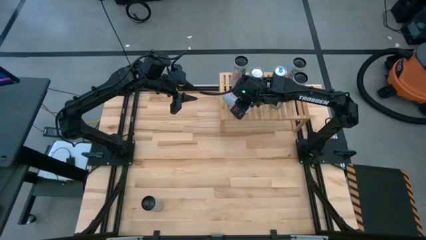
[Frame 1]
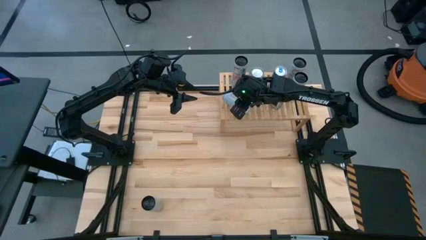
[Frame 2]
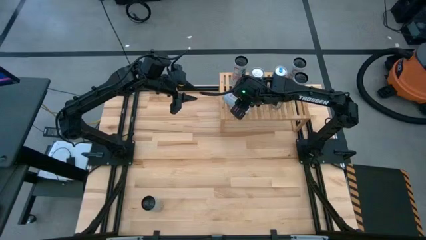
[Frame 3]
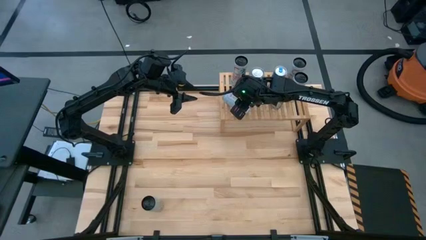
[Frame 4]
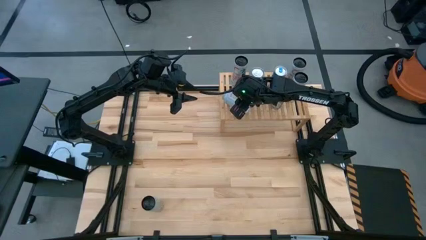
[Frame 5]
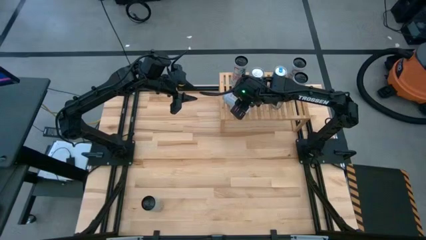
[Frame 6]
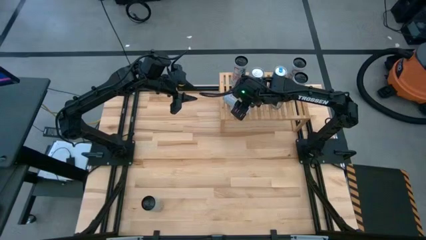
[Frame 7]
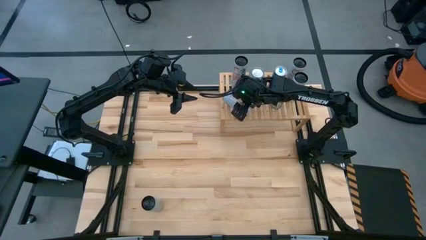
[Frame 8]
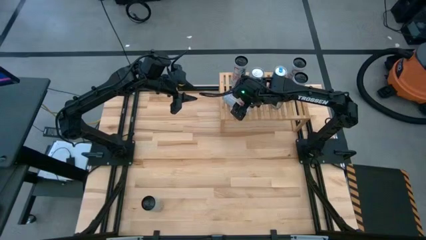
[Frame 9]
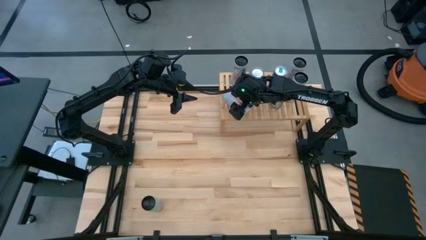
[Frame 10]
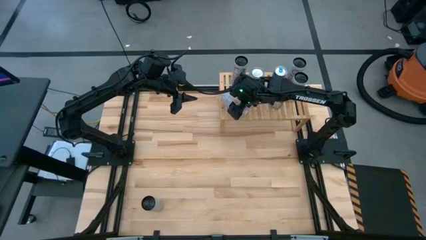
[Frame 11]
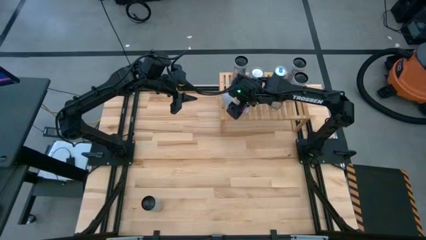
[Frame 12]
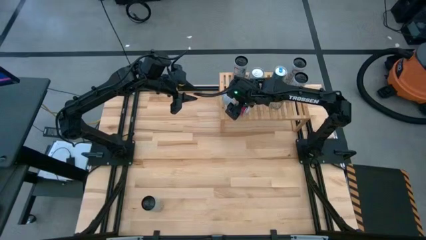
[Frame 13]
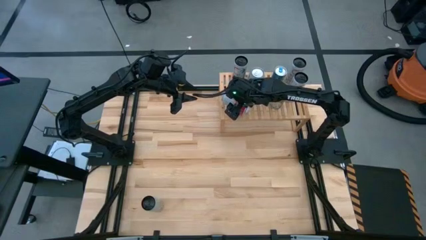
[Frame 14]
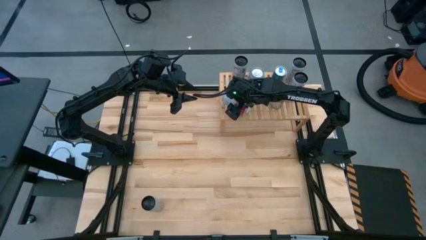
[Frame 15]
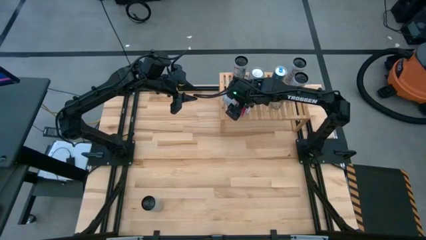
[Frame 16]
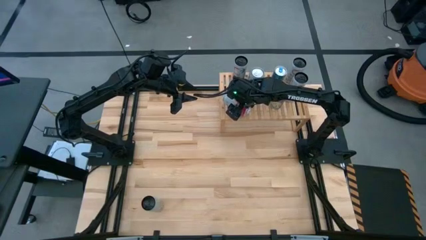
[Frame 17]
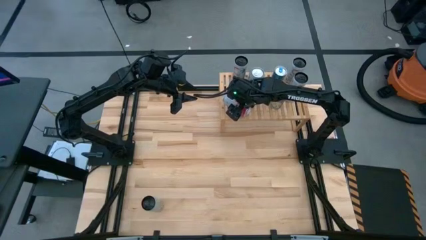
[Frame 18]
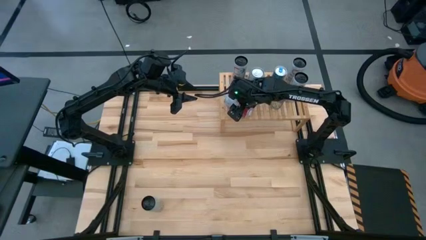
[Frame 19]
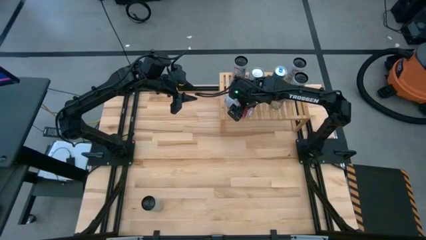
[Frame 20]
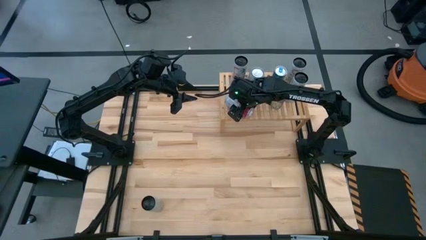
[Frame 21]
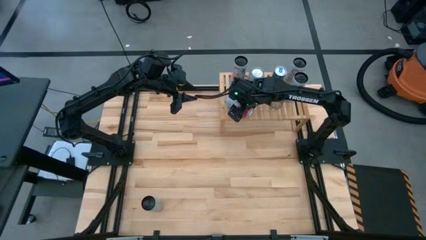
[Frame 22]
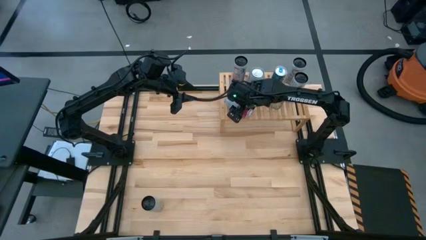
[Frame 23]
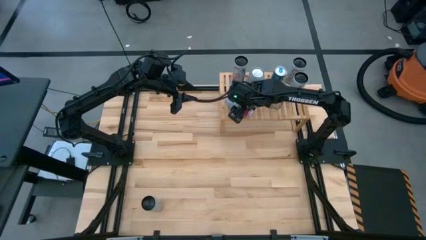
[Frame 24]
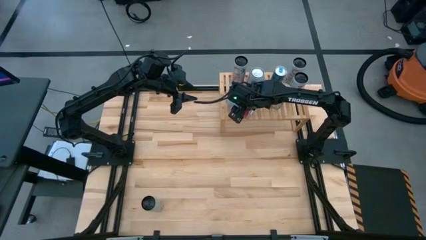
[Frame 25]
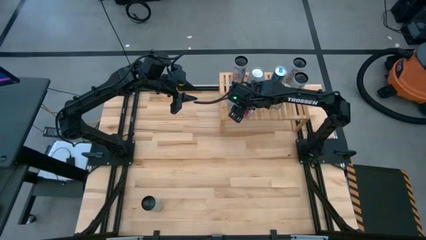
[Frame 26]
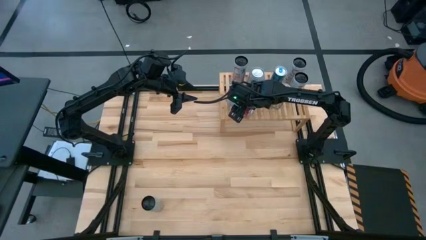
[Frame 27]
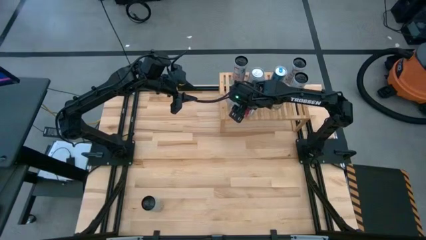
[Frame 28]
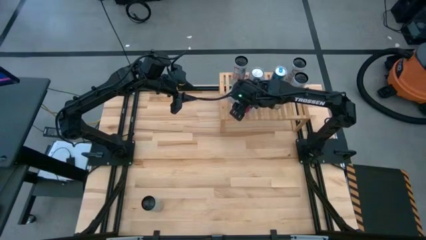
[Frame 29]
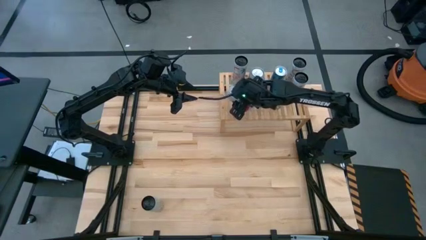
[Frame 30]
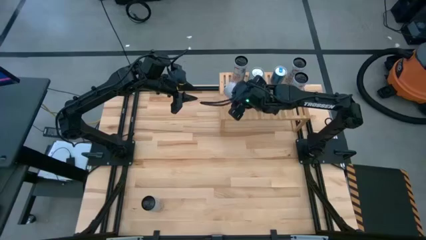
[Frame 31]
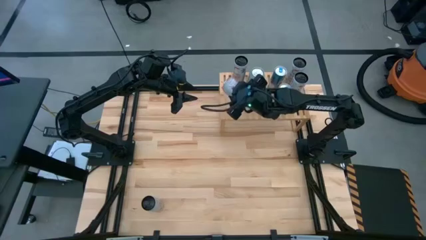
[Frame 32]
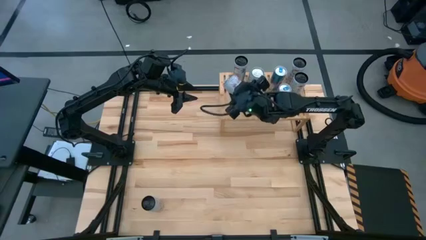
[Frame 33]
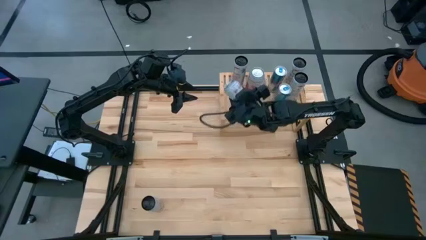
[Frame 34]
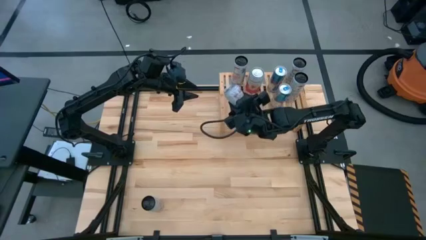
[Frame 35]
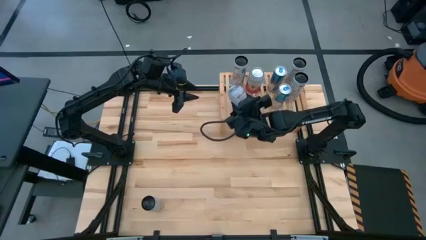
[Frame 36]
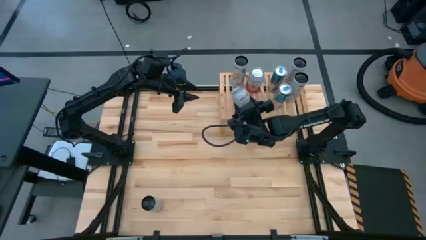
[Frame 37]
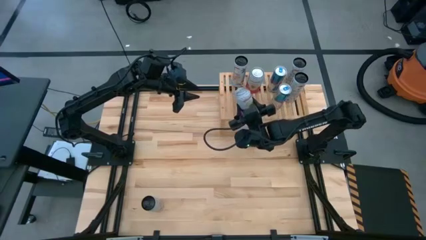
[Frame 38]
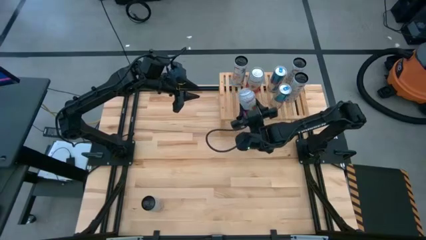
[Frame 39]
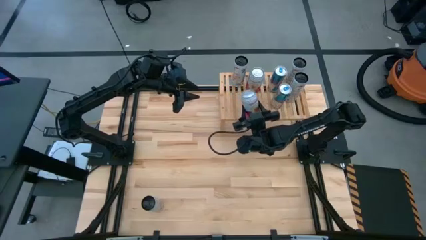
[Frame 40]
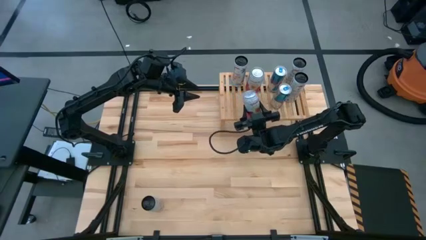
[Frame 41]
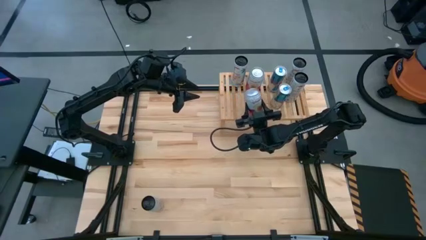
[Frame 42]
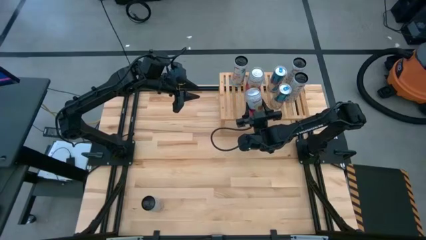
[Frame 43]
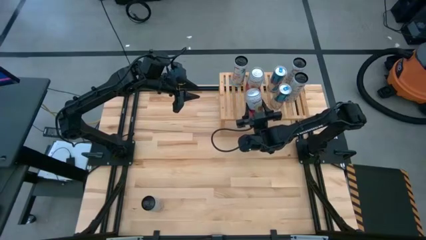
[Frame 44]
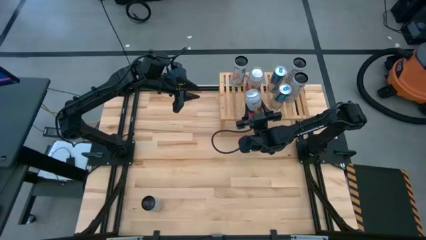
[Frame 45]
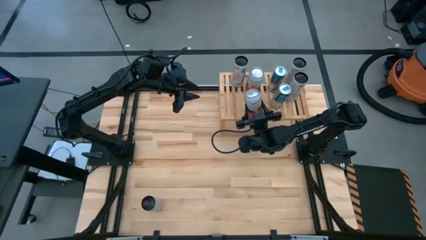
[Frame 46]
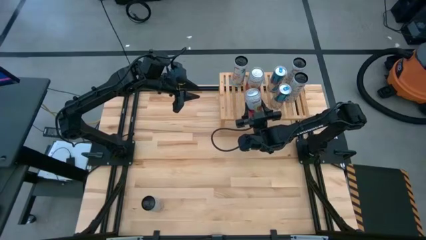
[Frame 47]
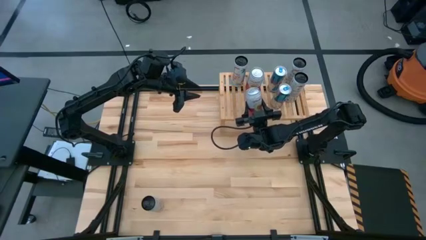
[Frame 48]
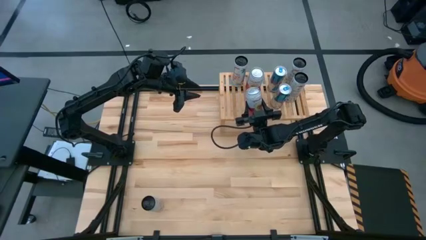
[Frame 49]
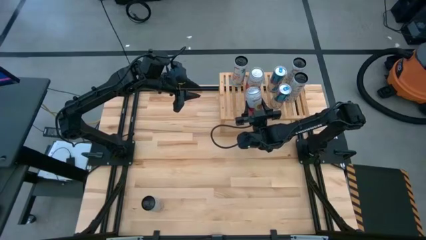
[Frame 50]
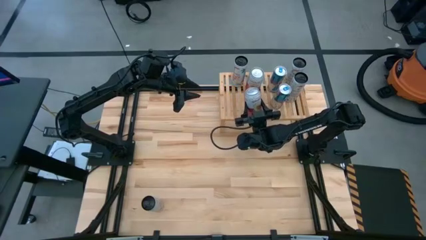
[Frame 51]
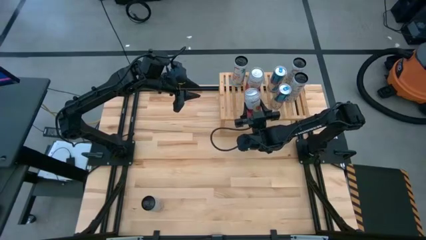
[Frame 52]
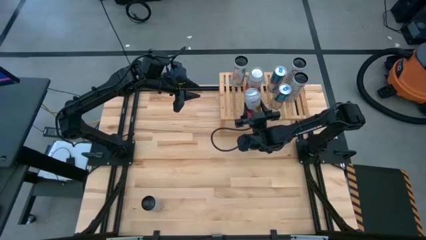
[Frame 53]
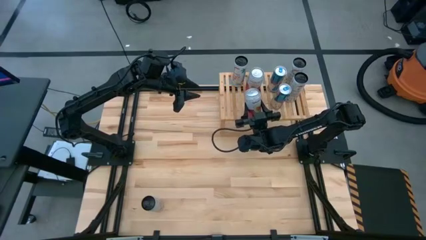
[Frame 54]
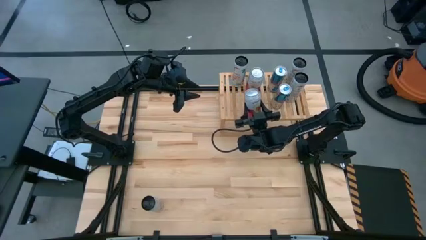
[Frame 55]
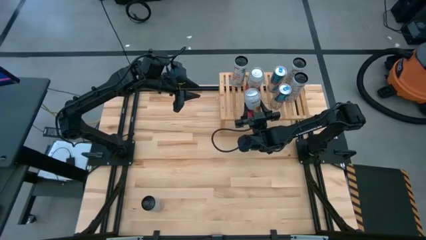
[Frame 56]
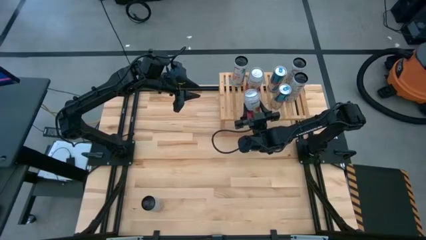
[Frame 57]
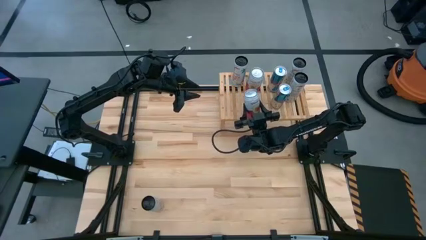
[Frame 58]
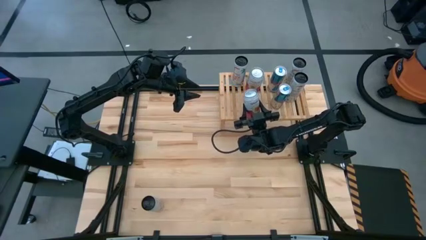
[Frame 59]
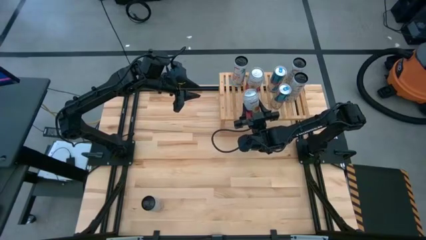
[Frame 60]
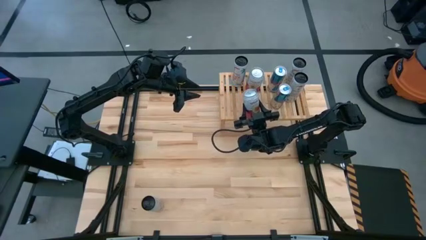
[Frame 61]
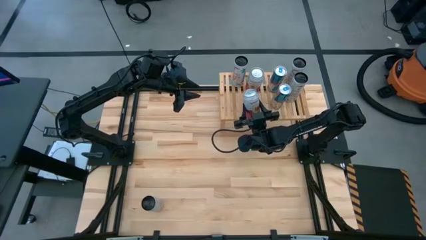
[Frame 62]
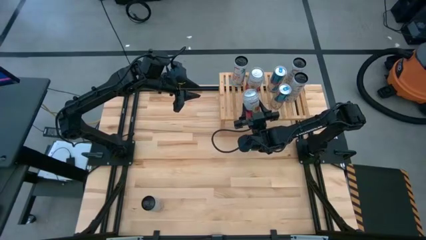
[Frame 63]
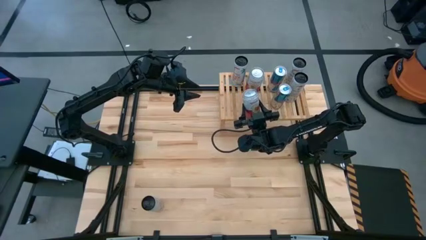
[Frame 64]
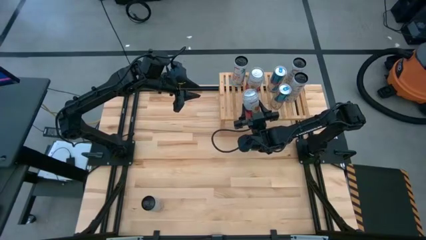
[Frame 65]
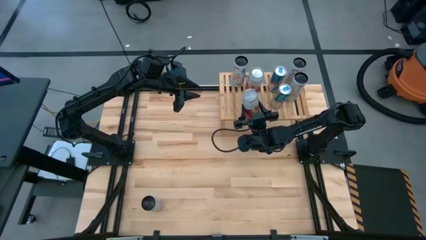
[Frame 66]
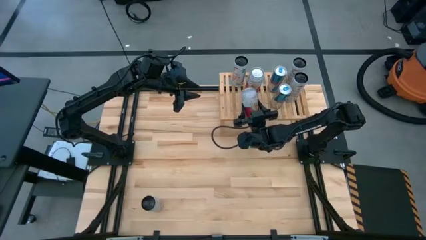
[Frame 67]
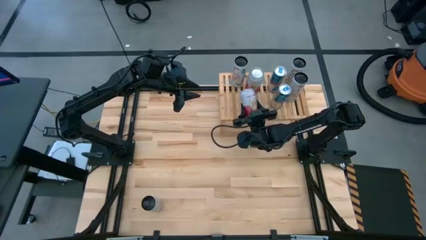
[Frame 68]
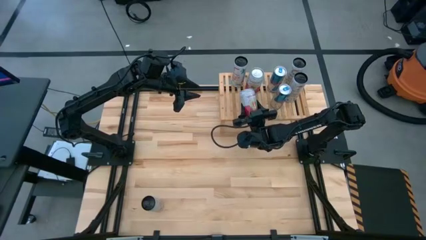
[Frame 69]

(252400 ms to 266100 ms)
Task: Place canned beverage on shelf
Put the pink-white soda can on the shelf aligned with the other pink-white soda can
